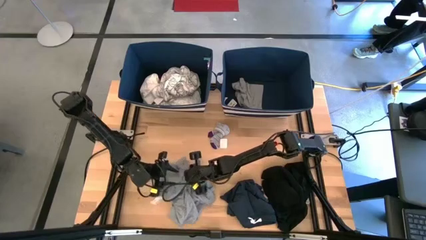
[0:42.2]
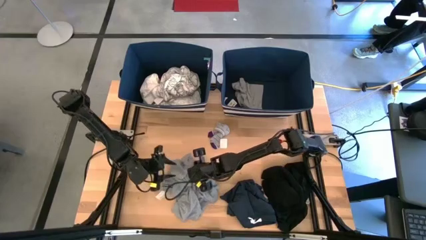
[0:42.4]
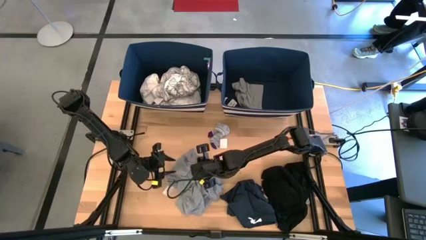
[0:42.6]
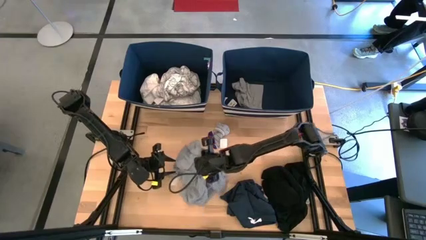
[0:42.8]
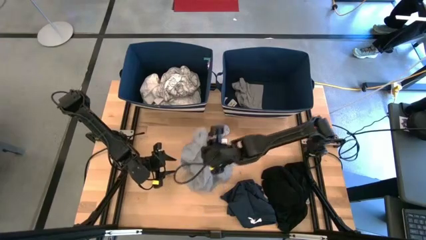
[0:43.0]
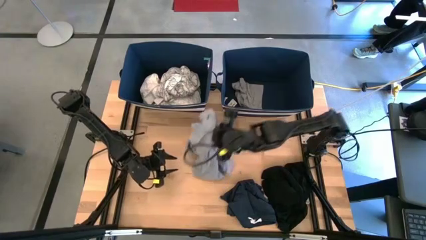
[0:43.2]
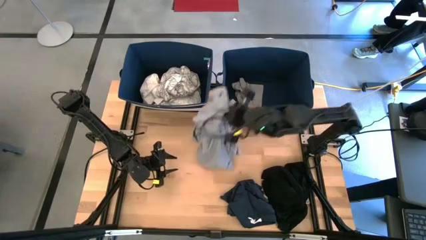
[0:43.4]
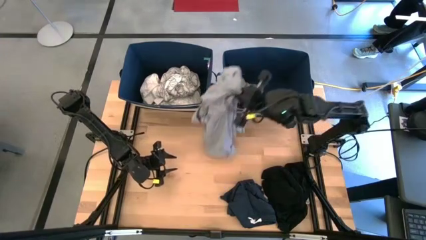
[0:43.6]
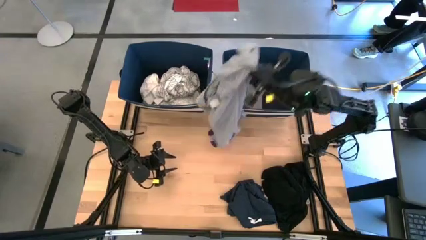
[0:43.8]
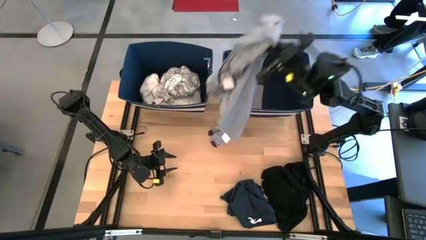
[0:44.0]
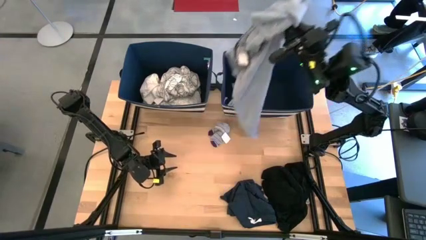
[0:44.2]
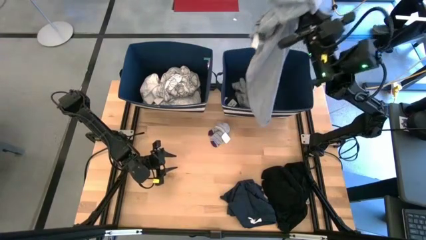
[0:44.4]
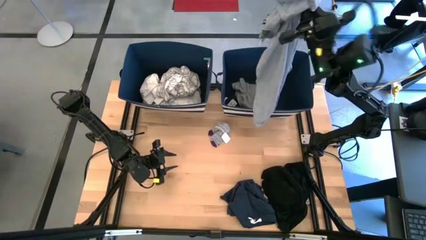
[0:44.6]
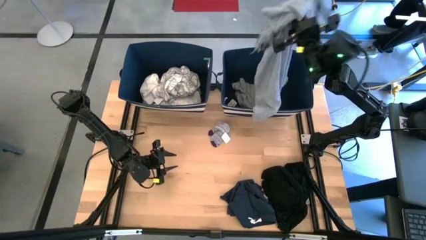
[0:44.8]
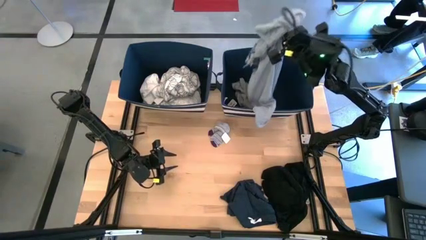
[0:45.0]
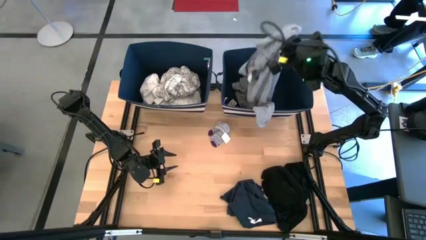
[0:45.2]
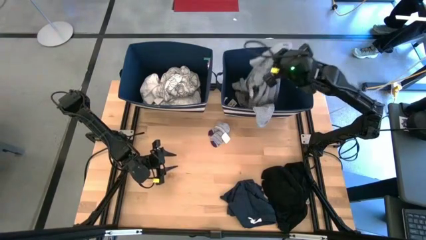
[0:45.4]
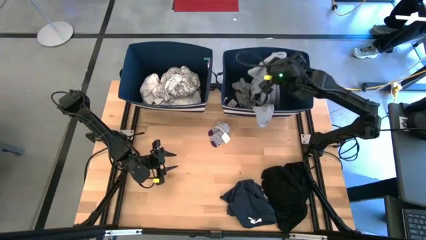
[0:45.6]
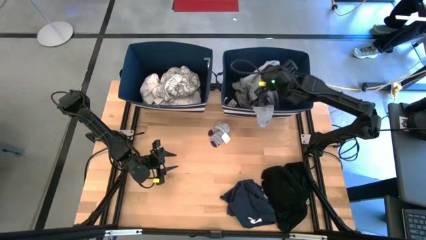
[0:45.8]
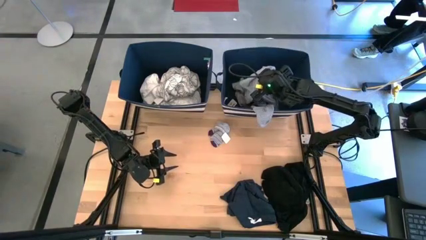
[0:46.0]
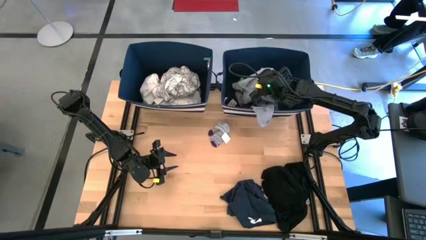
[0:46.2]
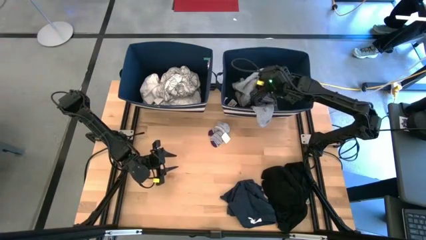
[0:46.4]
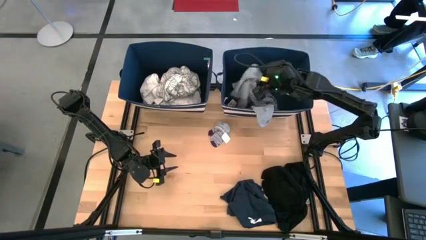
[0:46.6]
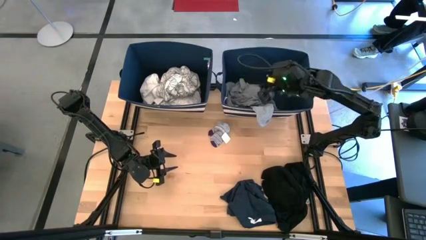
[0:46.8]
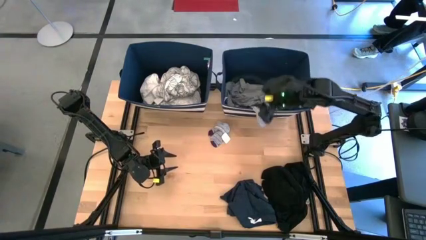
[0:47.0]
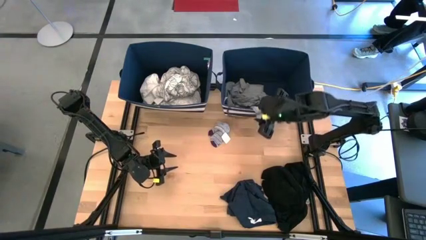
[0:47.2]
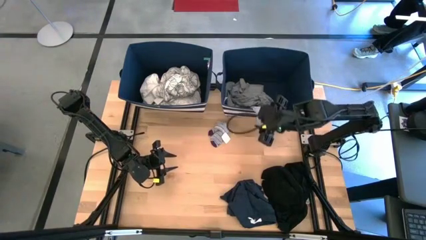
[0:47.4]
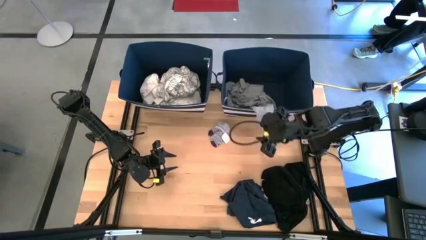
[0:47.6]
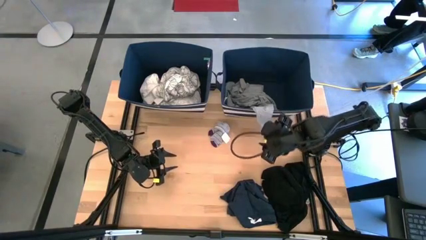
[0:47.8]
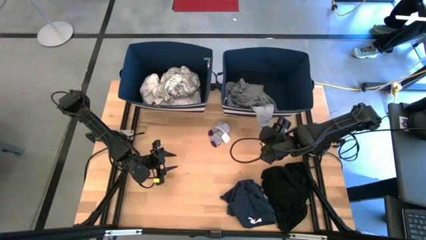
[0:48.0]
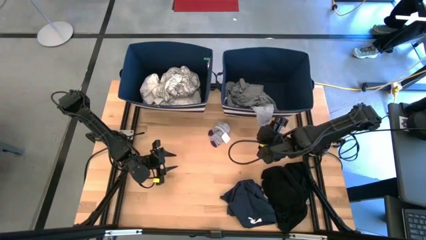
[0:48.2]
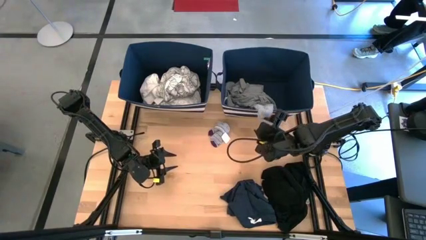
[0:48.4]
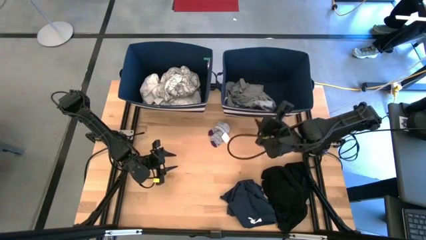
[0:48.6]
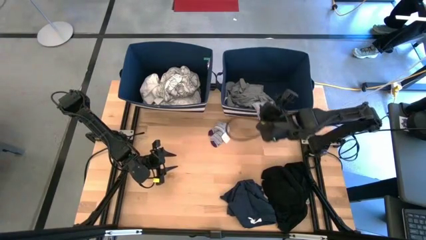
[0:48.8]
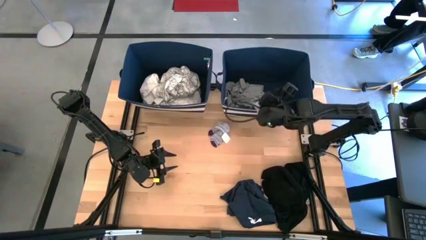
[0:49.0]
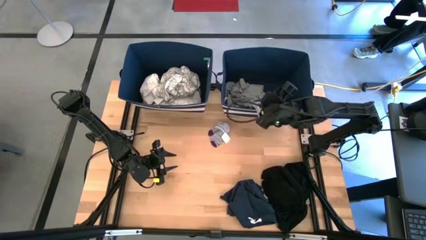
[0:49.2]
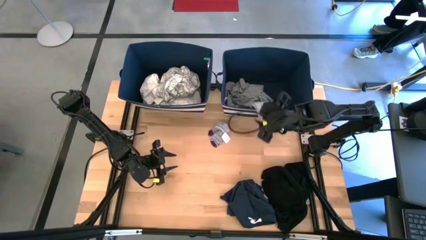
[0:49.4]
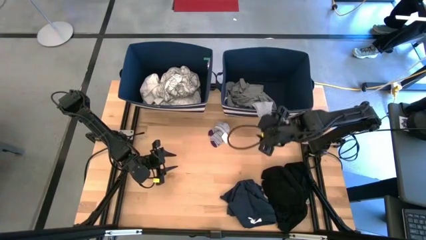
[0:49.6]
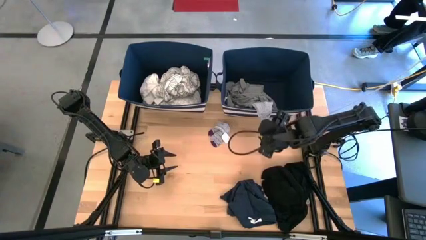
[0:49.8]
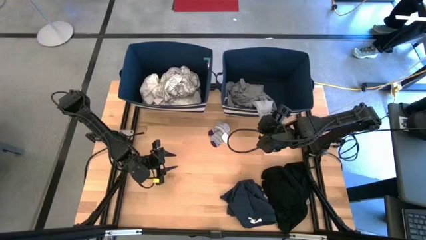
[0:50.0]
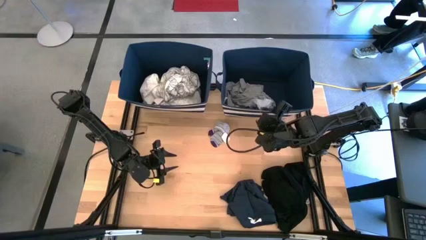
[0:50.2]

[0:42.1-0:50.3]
Task: Sort clothes
Put the grey jacket into the left laundry organizer

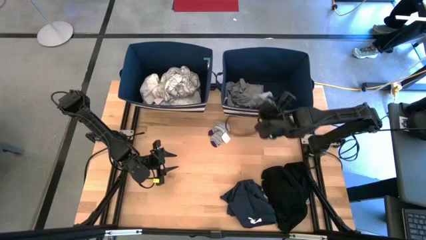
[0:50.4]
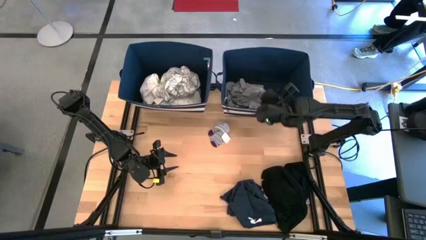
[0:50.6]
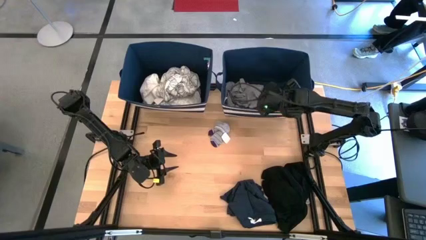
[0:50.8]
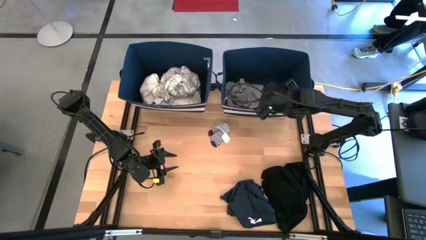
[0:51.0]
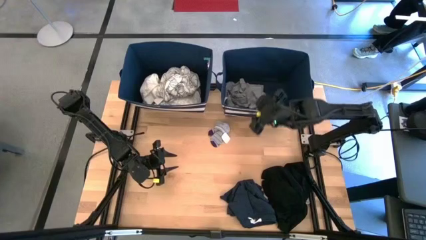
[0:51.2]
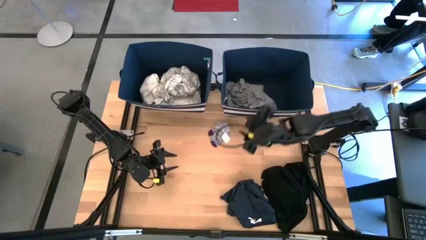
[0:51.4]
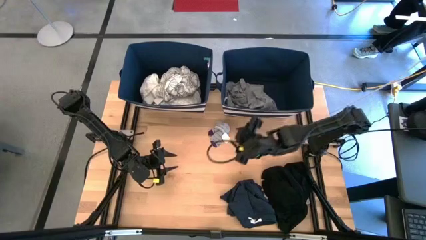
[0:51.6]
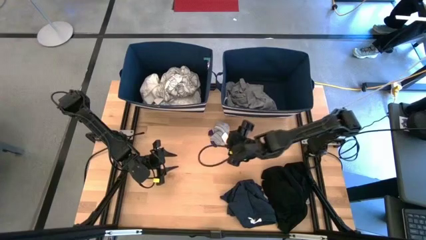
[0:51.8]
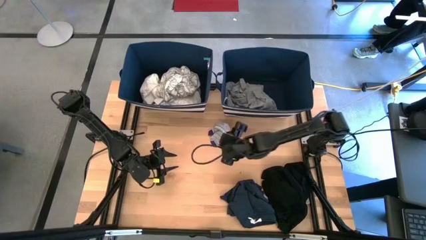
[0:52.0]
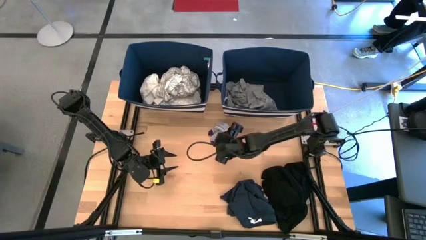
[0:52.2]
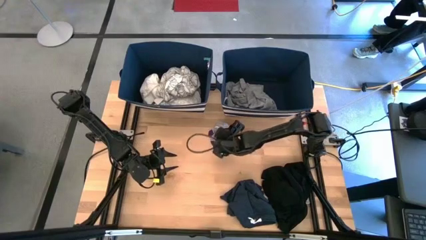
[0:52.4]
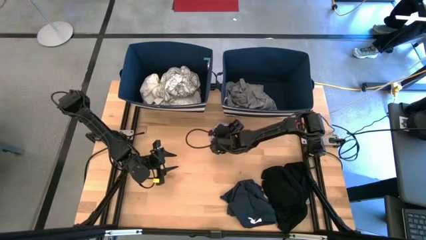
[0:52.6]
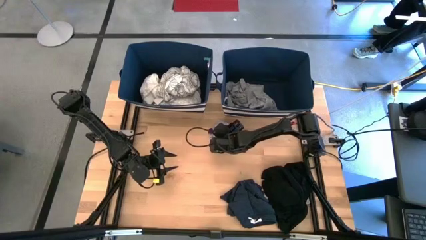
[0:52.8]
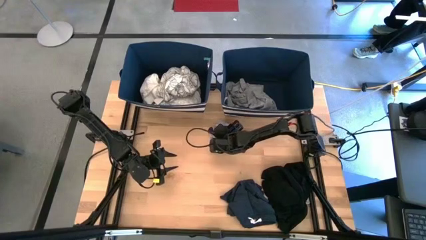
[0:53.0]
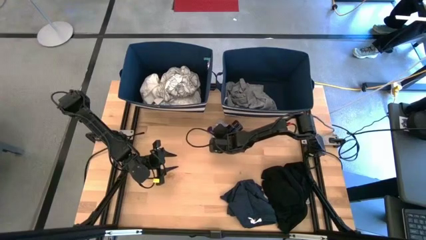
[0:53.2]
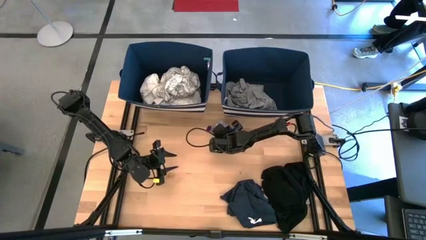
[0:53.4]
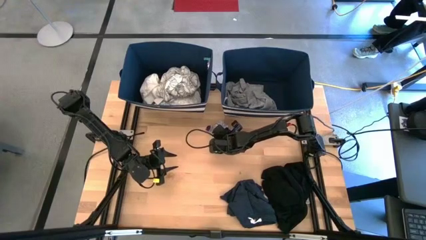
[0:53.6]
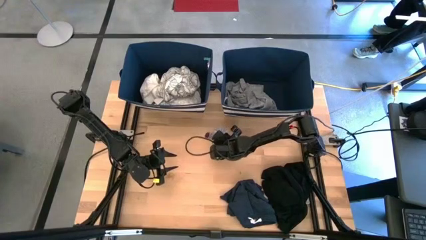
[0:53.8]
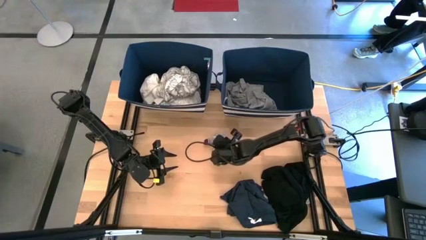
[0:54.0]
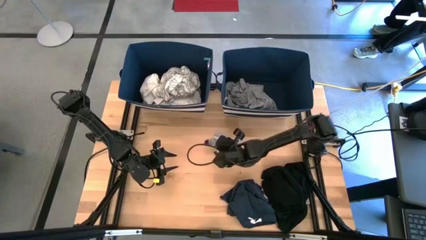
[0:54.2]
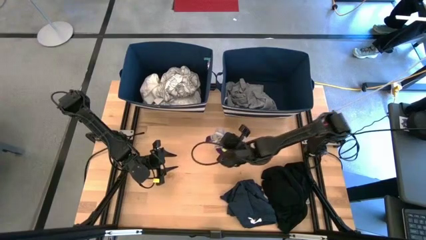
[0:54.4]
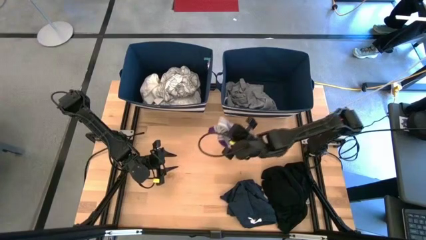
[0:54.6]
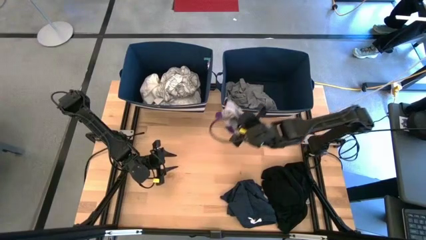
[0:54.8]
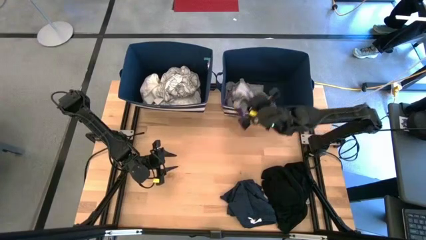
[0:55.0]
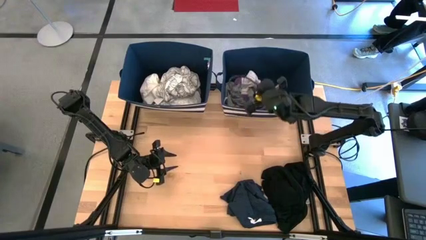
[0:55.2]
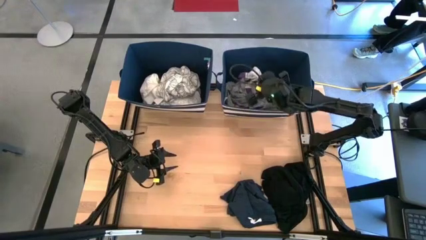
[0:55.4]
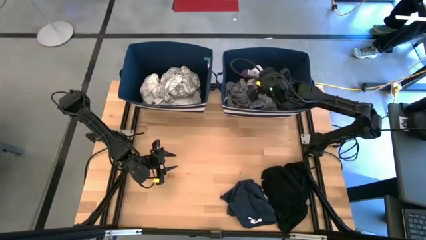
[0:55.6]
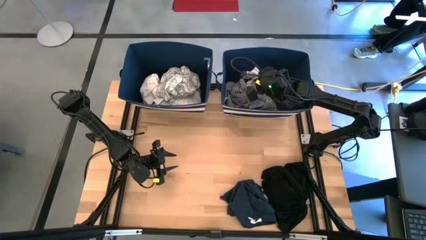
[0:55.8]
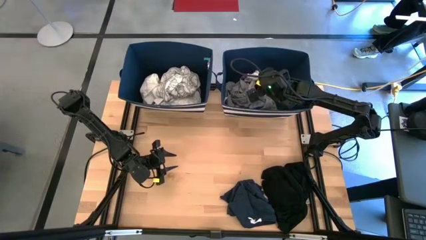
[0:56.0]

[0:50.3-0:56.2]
Put the gray patterned sock into the left laundry organizer

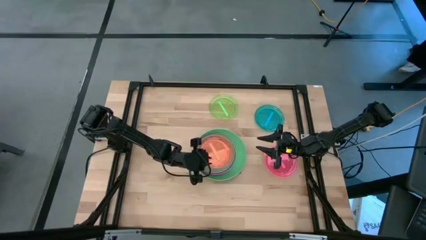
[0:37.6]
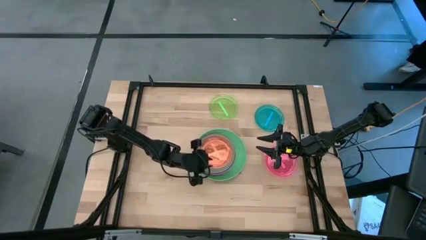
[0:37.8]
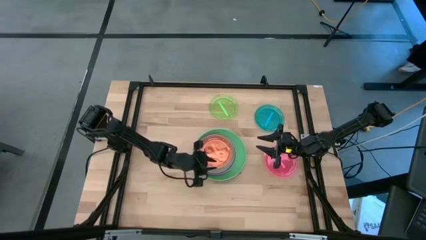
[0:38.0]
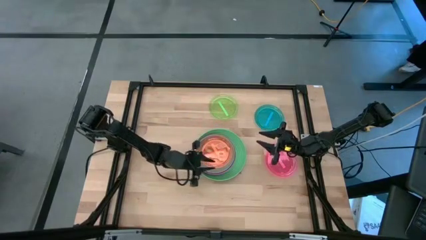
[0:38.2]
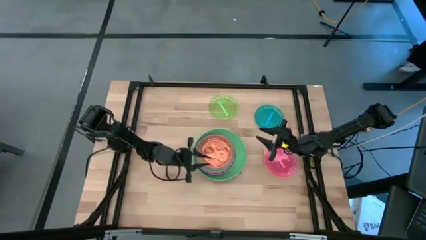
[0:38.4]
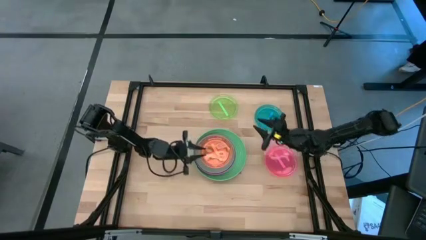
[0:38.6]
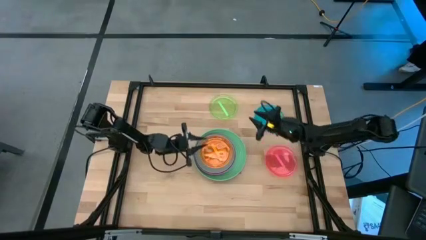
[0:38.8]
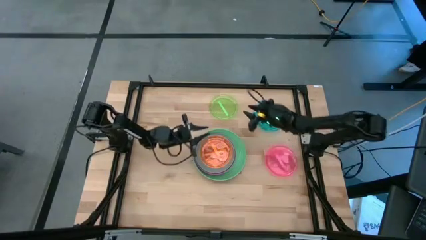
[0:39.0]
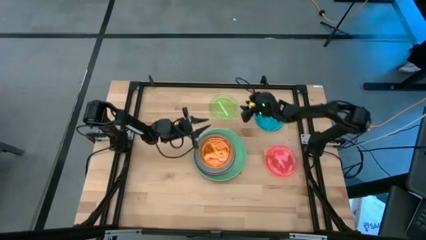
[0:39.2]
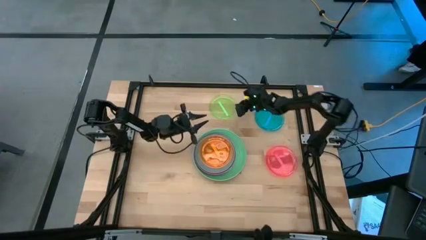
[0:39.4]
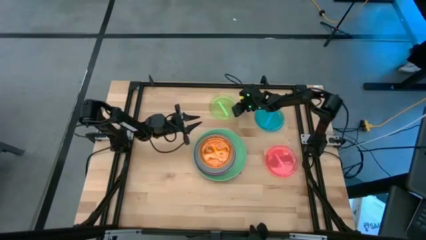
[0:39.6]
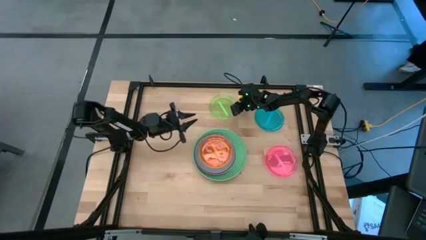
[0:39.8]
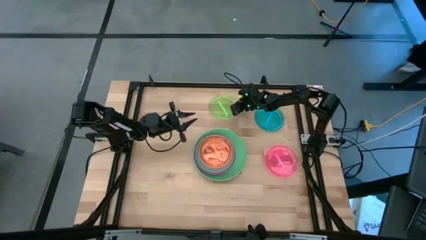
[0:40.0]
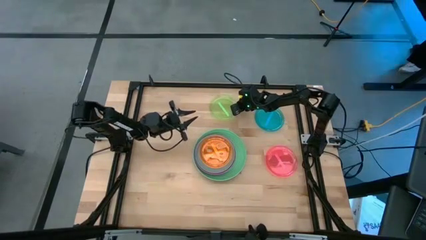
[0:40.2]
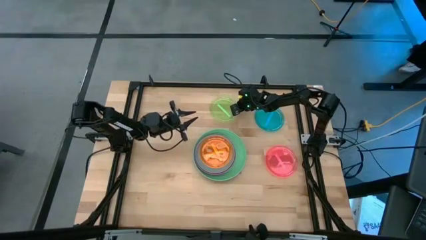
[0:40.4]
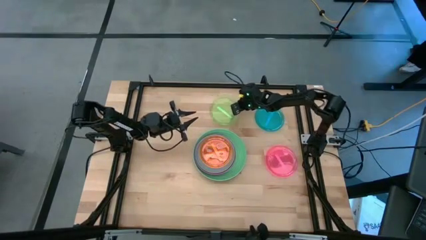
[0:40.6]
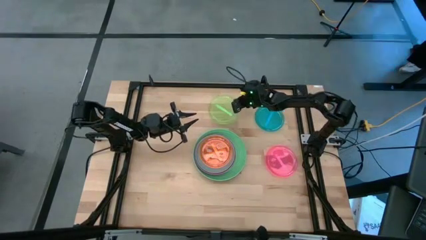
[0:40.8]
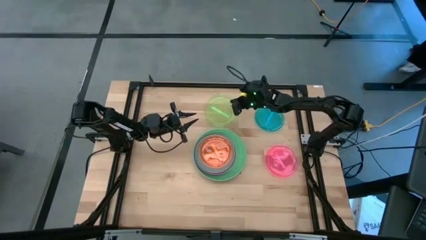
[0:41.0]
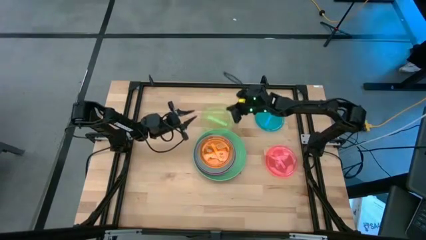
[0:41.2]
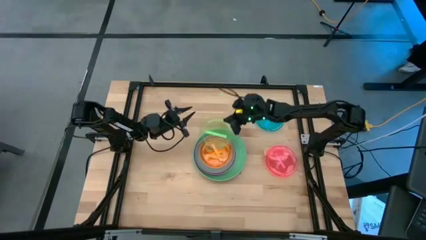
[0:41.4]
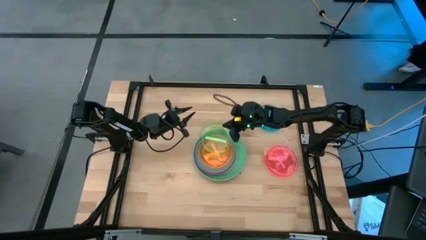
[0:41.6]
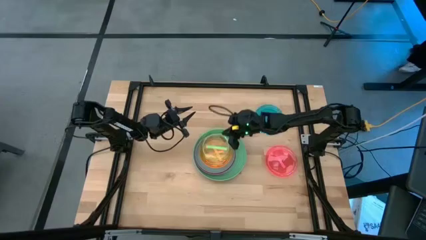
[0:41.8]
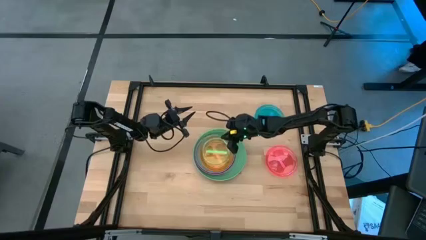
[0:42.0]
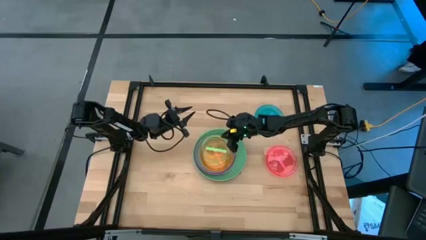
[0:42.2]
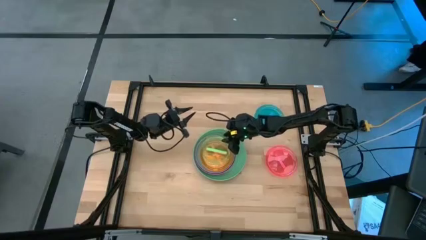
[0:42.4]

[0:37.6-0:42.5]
Task: Stack plastic plates
Stack the light green plate on top of the orange plate
